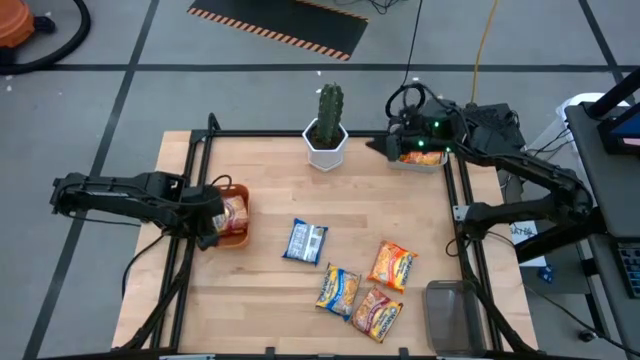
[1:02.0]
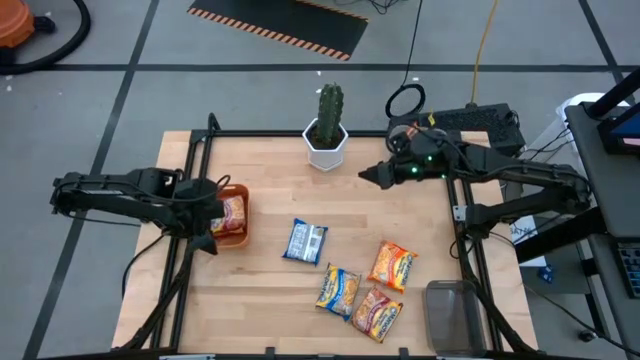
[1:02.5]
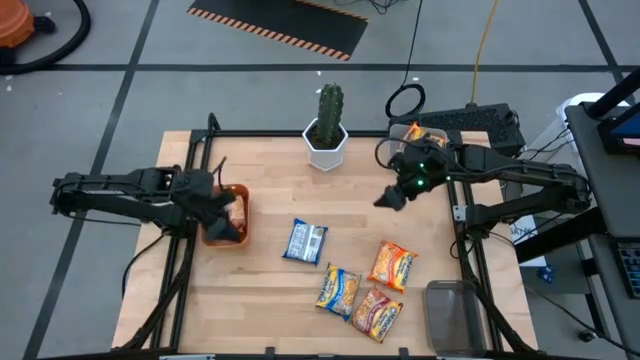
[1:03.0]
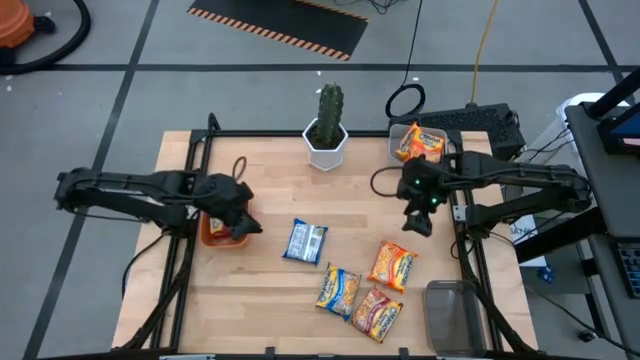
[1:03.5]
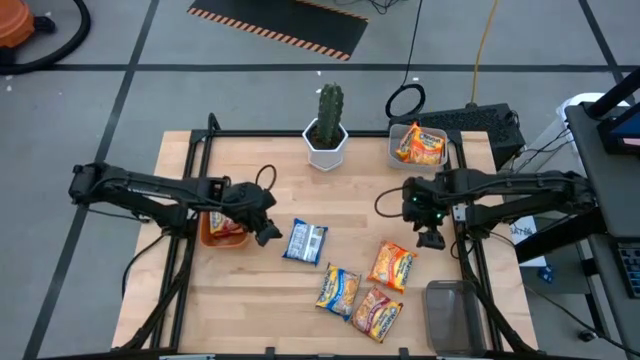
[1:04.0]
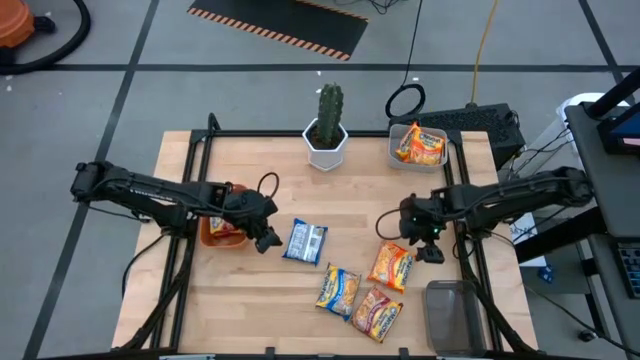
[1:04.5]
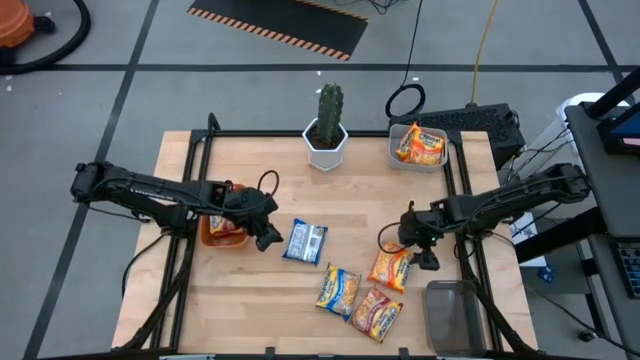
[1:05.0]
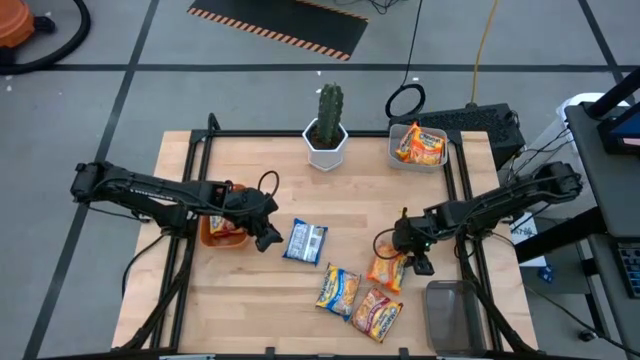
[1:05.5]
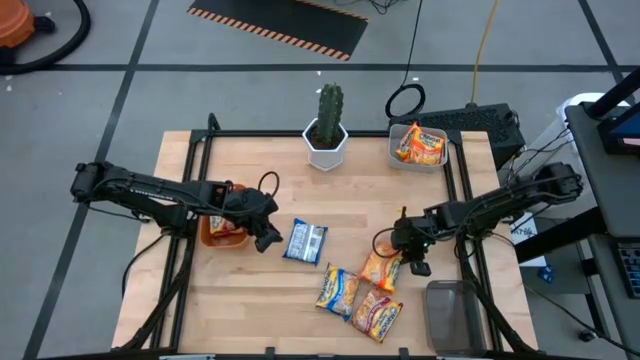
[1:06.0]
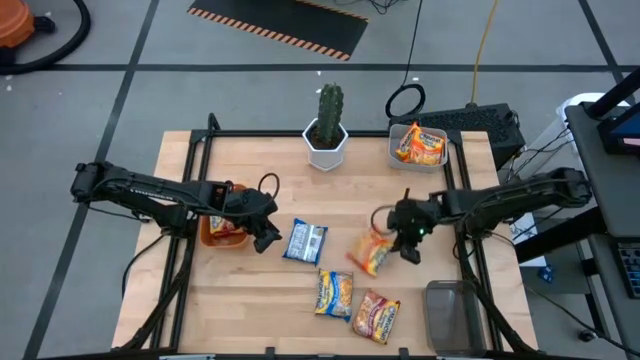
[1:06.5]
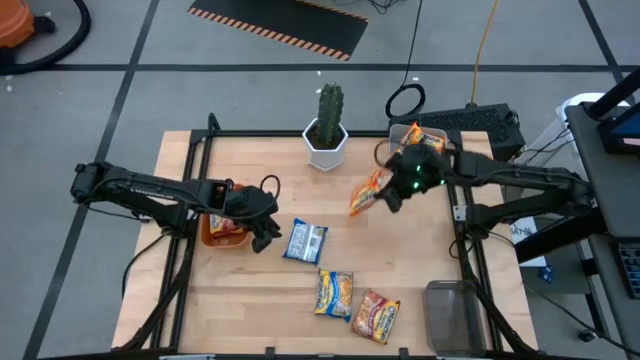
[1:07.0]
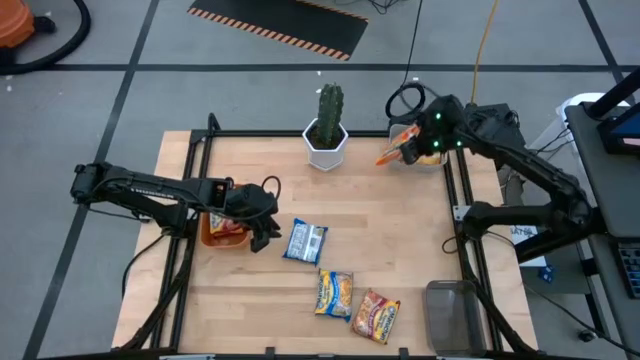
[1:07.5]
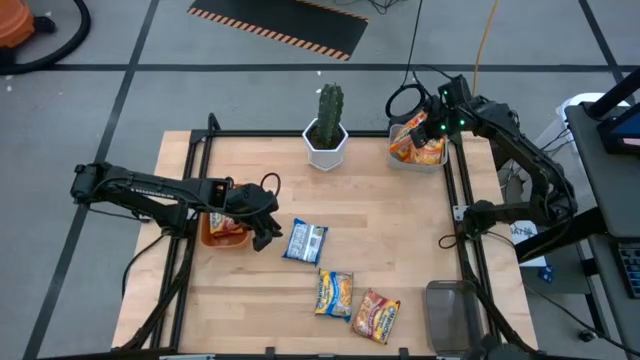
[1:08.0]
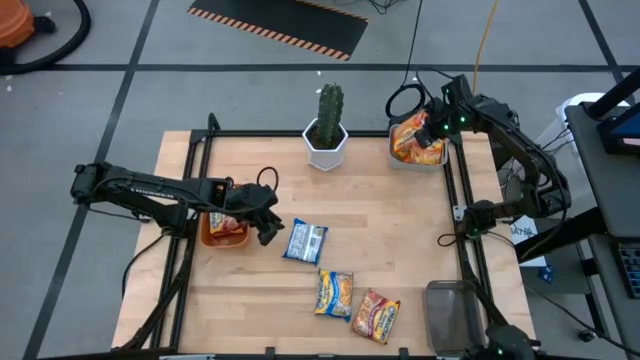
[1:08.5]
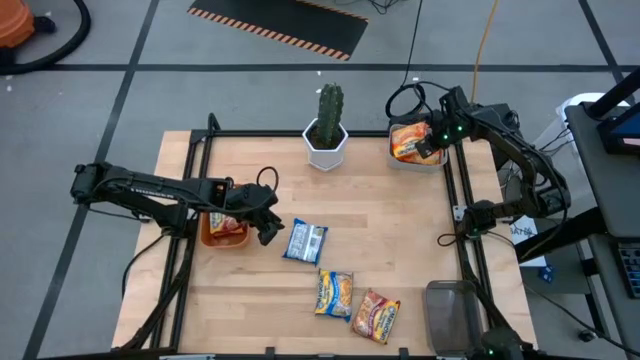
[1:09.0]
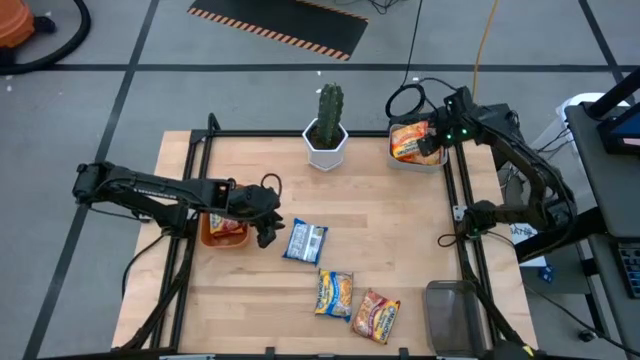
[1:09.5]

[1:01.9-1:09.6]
Task: Sort Maruchan noodles
Put the orange noodle pack into the gray bin

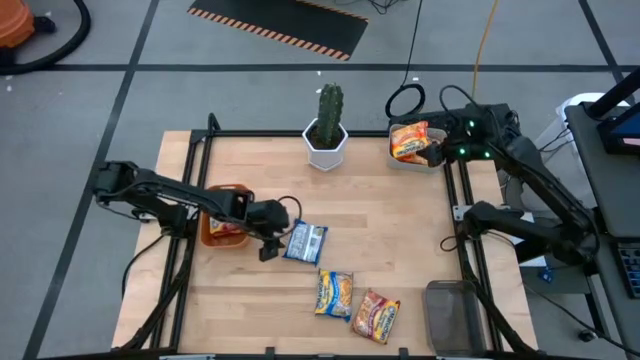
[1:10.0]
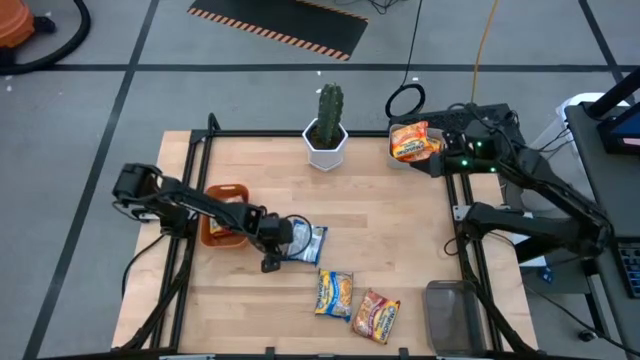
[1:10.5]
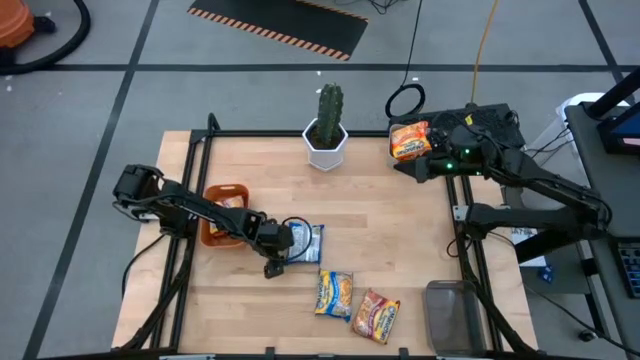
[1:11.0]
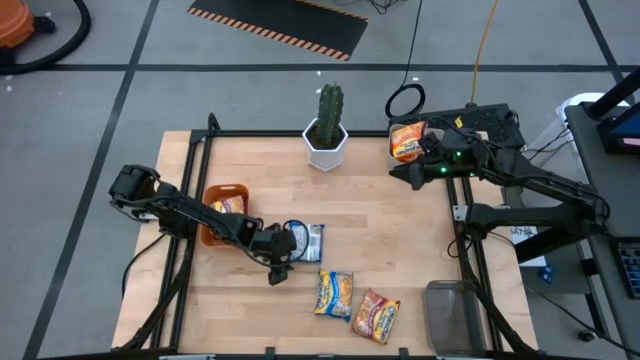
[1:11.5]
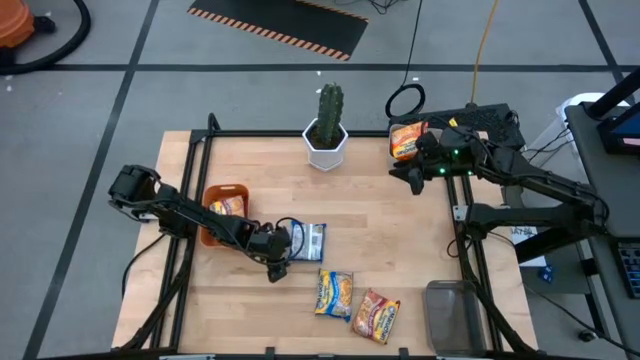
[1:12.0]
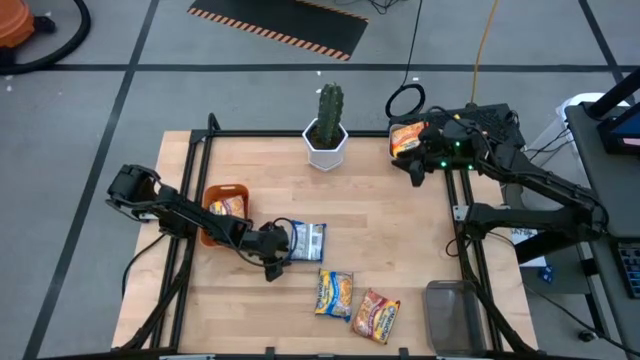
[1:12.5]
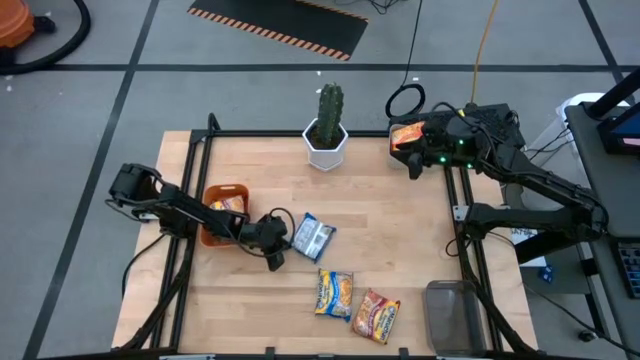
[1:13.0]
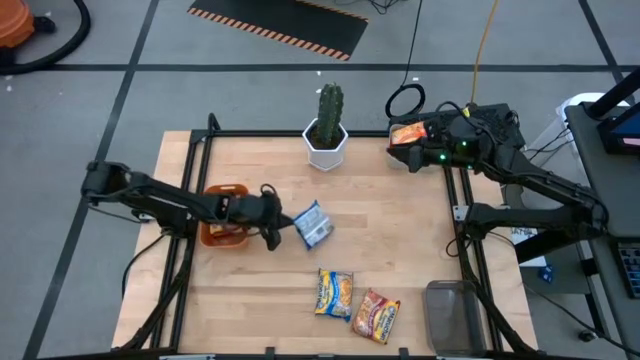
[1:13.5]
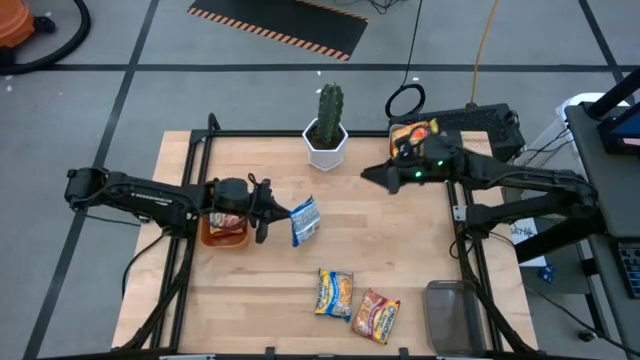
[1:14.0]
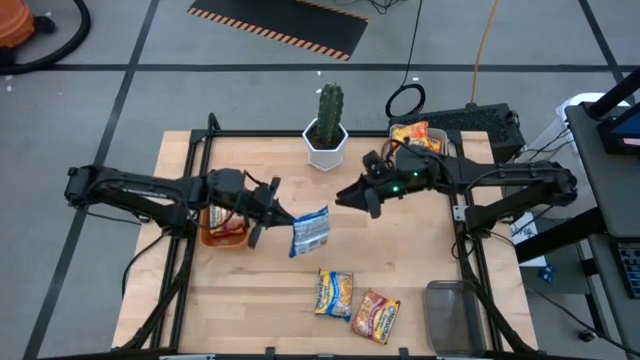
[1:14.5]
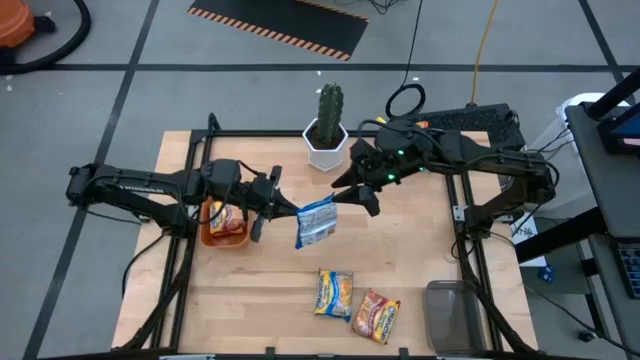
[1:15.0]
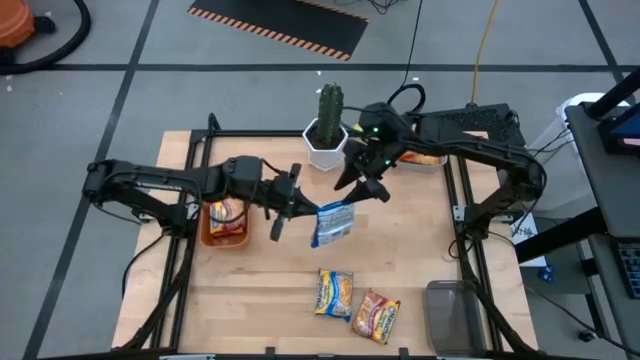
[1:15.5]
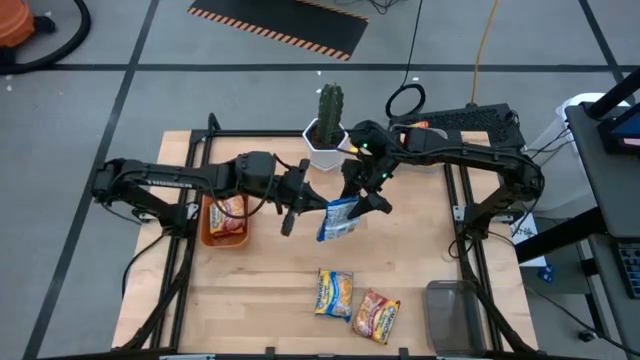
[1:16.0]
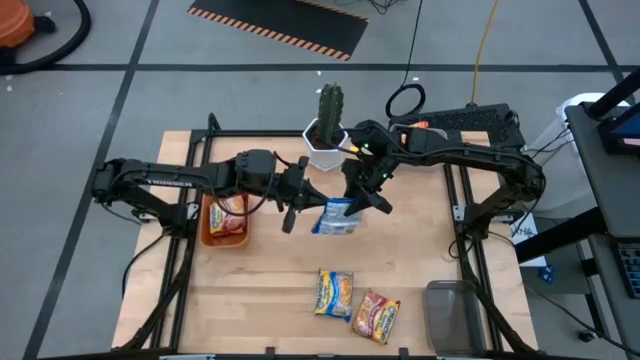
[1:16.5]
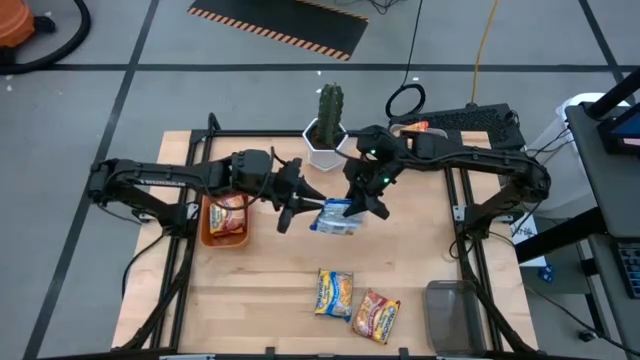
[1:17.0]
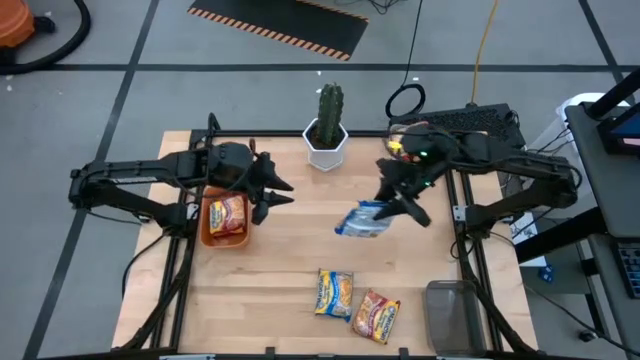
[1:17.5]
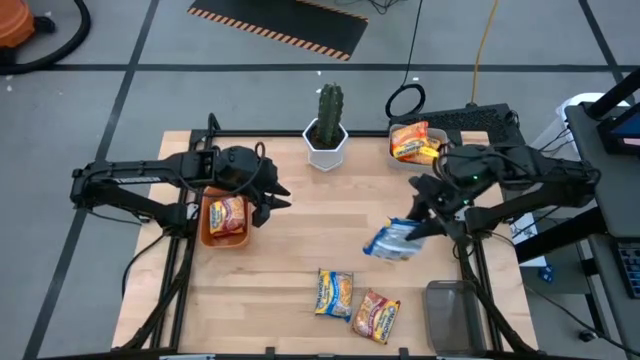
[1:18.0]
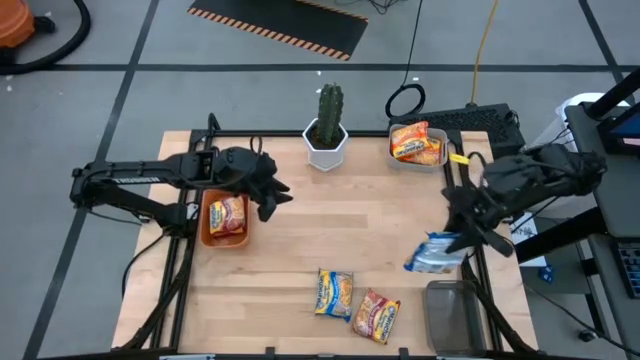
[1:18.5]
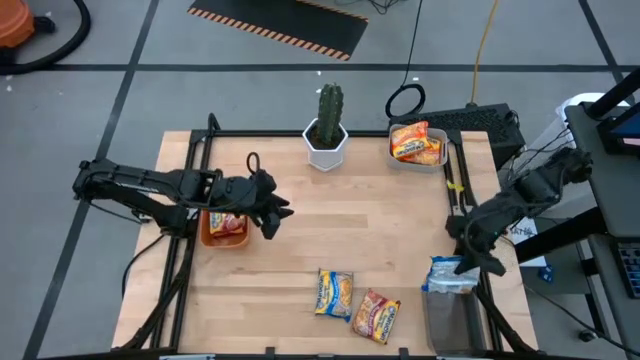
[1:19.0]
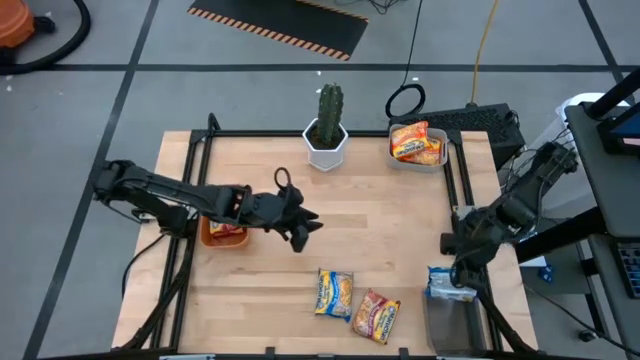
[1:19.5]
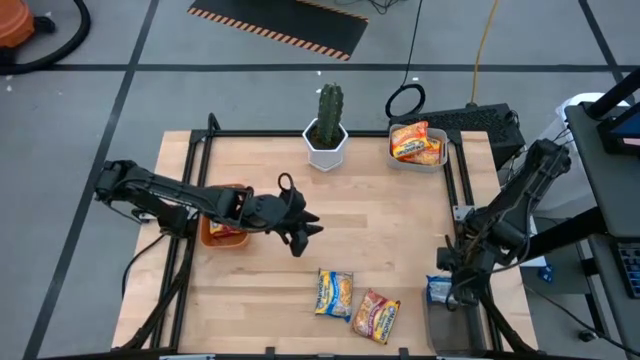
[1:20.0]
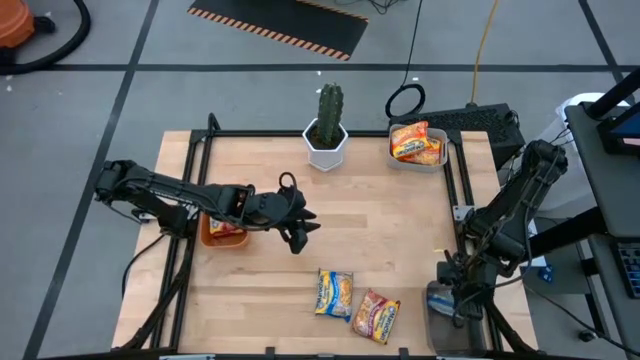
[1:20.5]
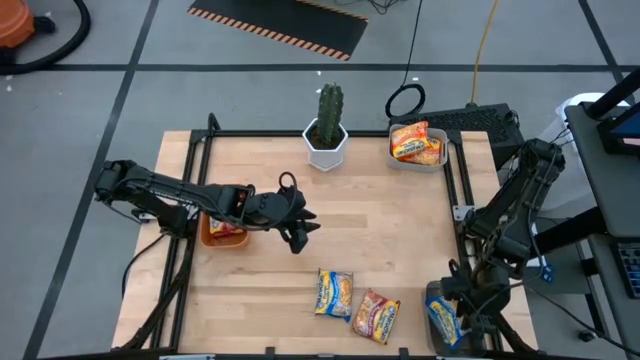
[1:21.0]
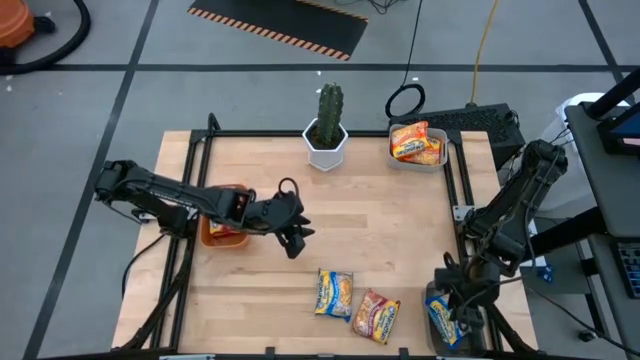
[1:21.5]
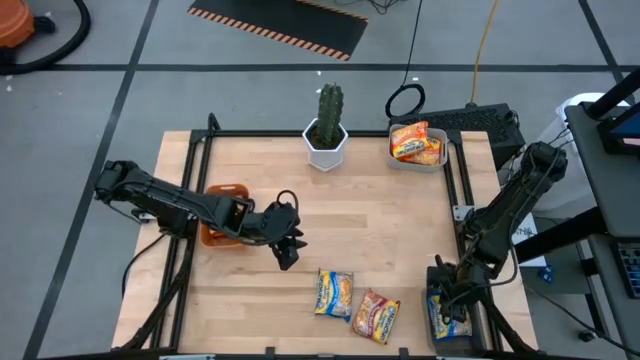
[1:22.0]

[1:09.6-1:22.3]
Put the top blue noodle pack into the black bin

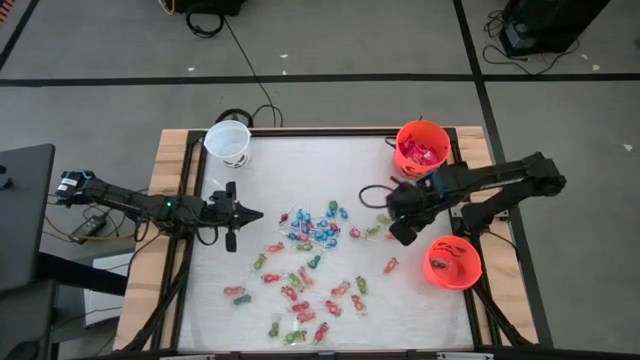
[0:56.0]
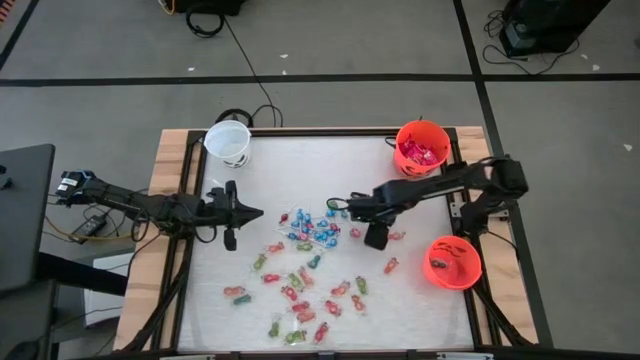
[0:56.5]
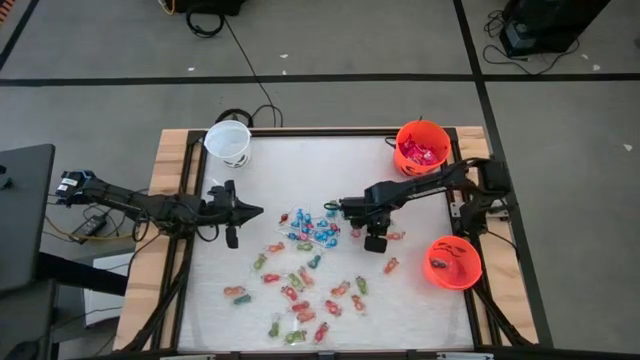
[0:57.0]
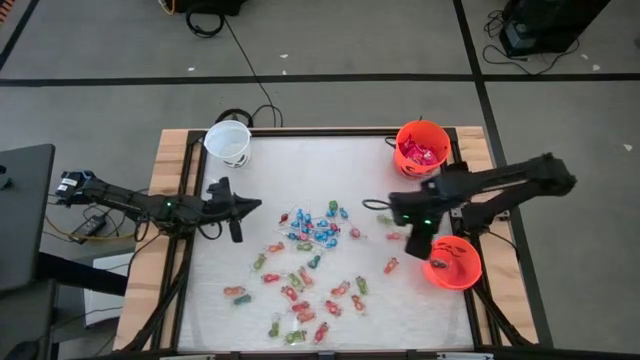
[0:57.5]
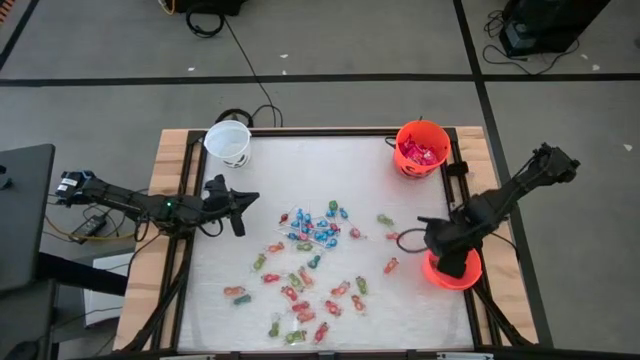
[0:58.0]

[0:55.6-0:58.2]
Task: Sort candy by brand, put in halloween buckets
Put the green gummy into the bottom orange bucket
